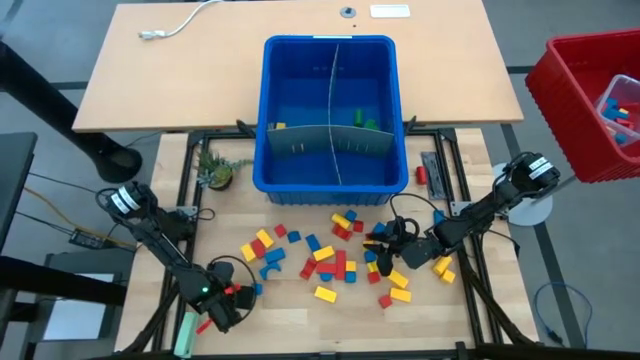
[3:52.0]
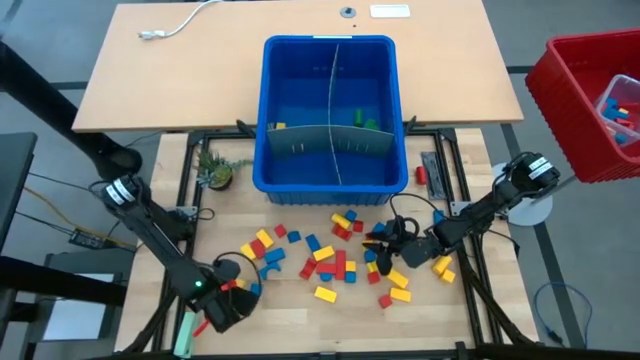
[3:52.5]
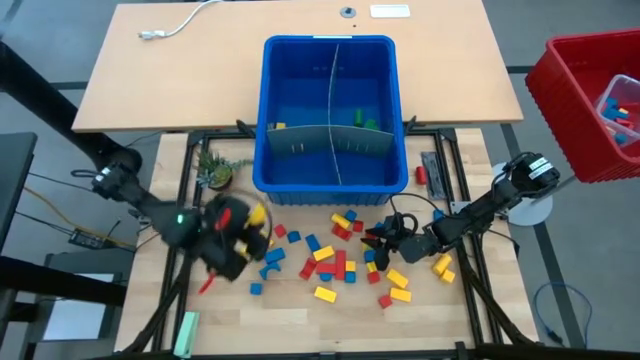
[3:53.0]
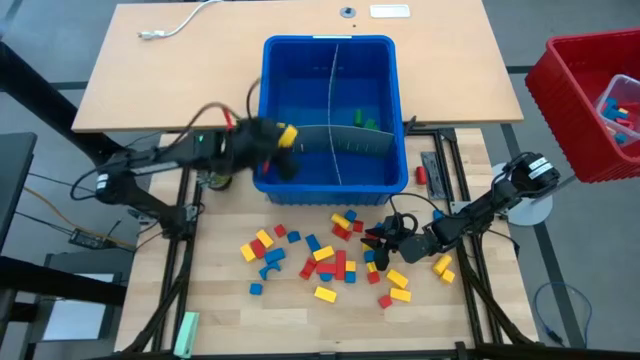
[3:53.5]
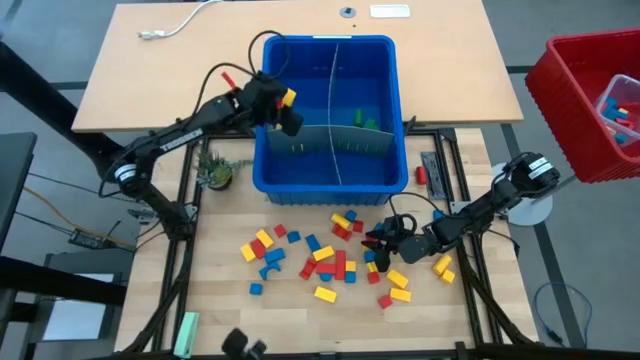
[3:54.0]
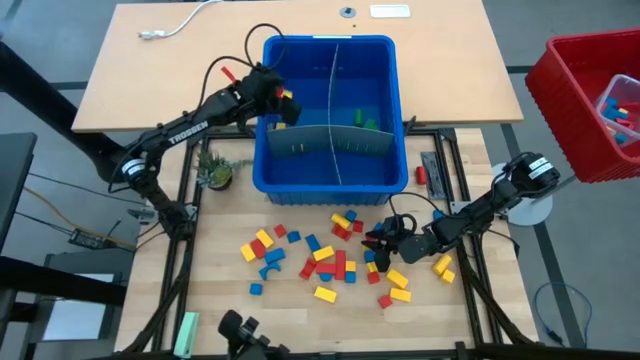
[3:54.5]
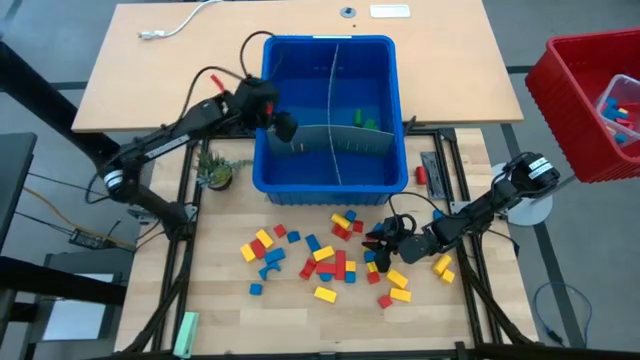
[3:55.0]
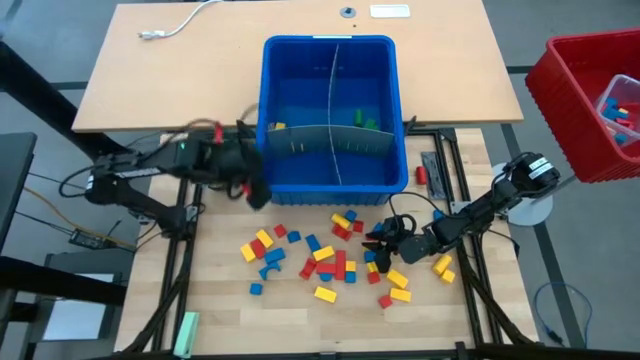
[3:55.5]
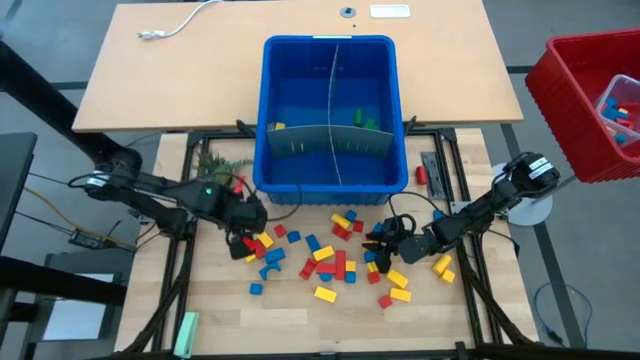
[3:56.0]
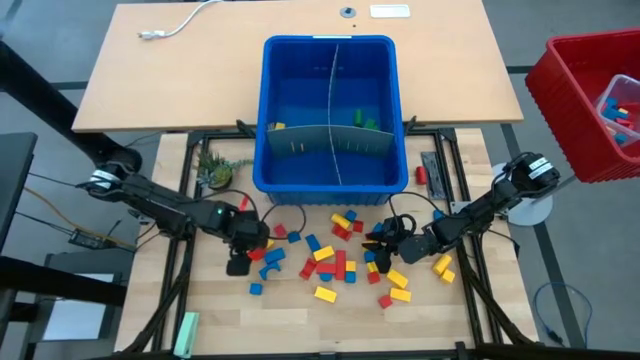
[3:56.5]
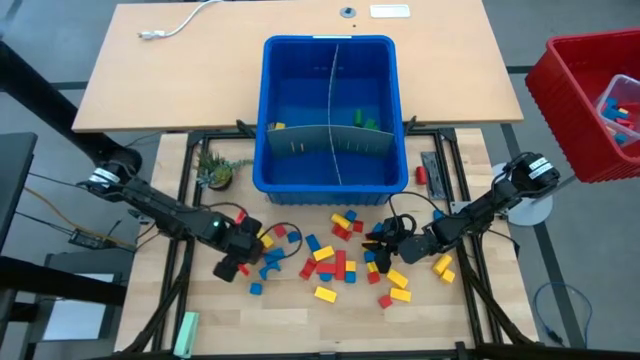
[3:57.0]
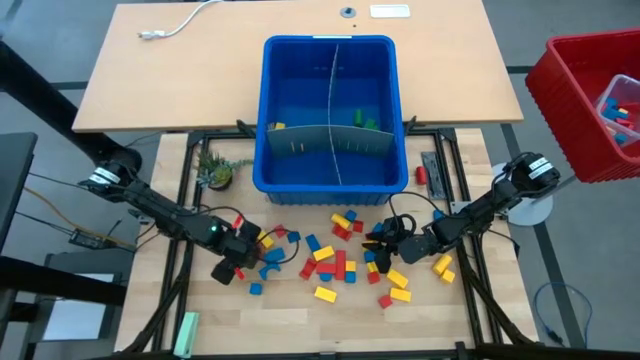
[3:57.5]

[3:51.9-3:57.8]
Task: Sort blocks
Put the yellow block with the other yellow block into the blue bin

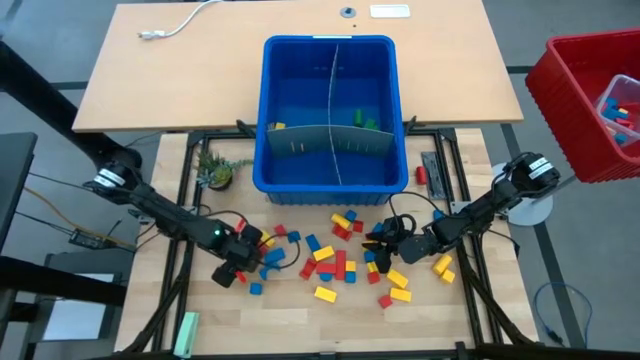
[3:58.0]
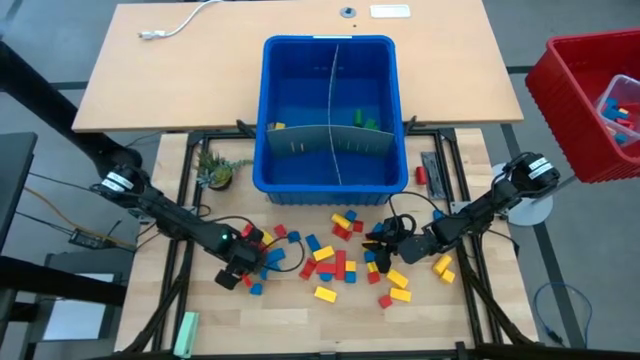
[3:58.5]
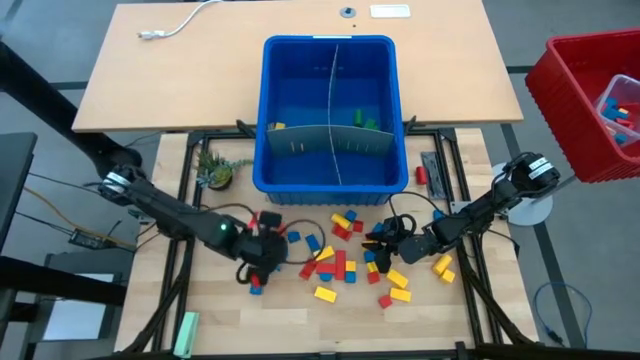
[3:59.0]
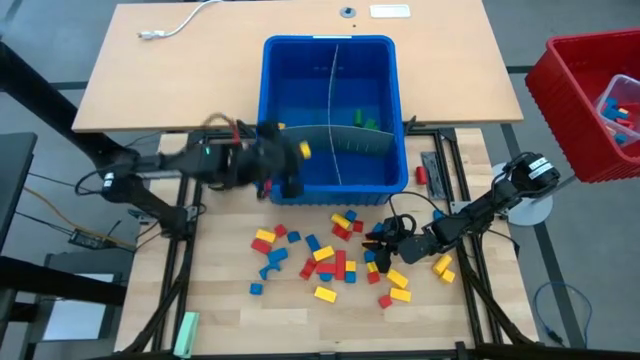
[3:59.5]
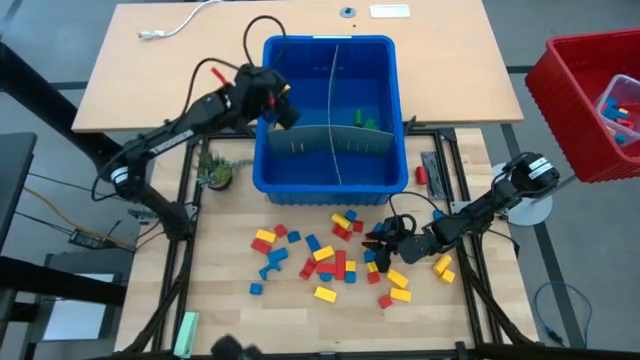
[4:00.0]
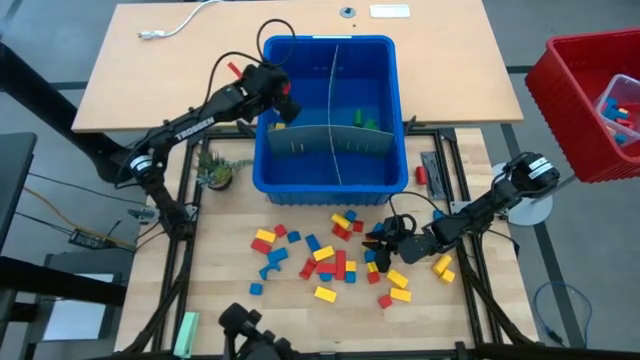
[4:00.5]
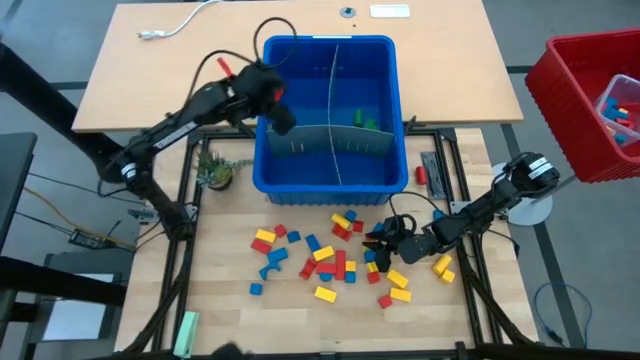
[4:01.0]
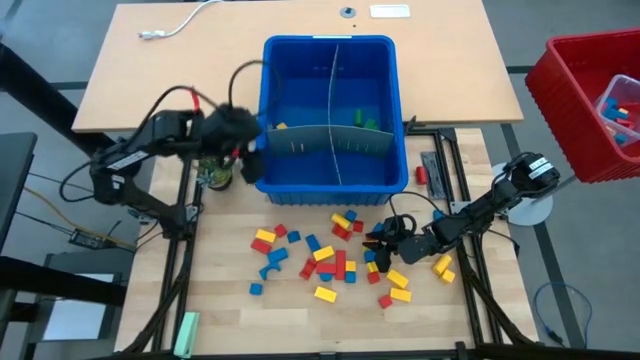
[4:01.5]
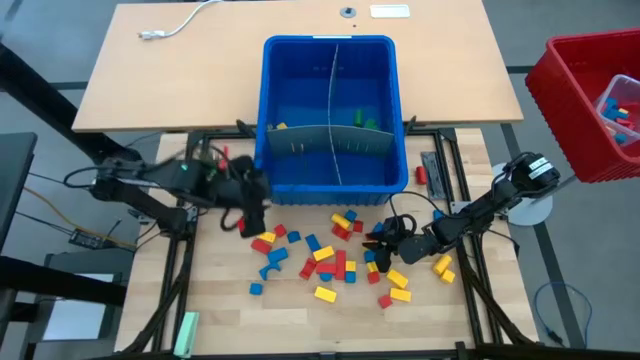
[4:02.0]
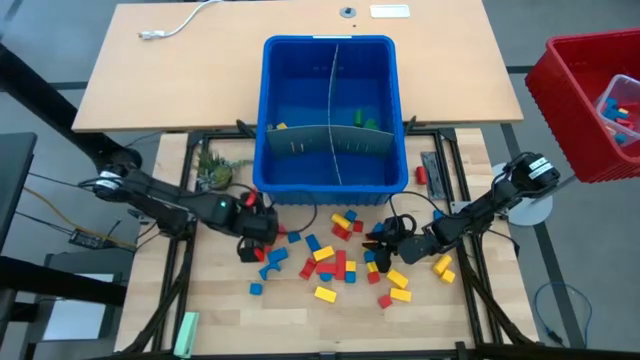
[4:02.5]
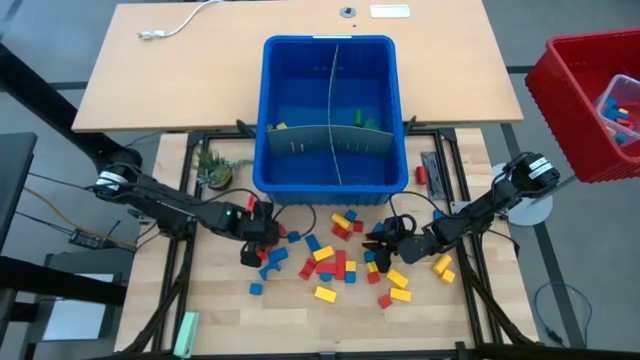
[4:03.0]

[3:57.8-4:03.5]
Put the yellow block with the other yellow blocks into the blue bin

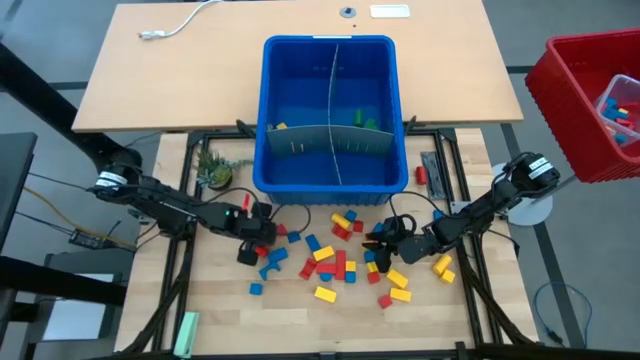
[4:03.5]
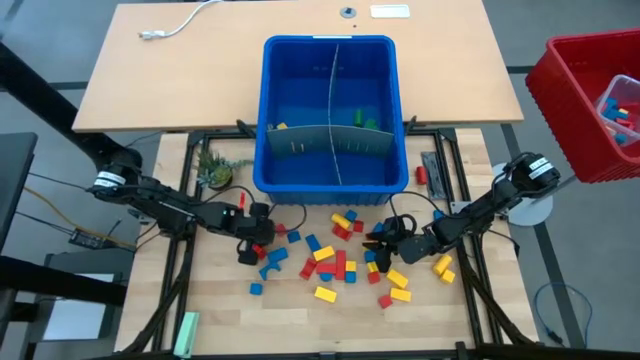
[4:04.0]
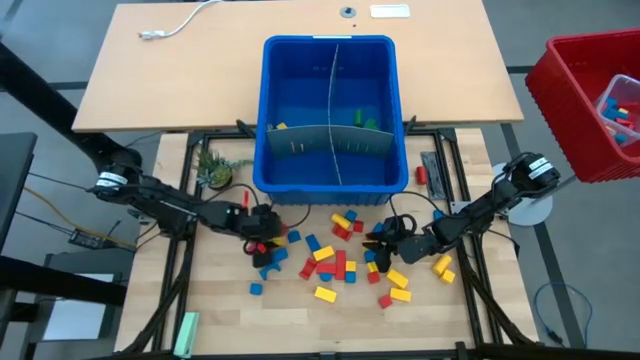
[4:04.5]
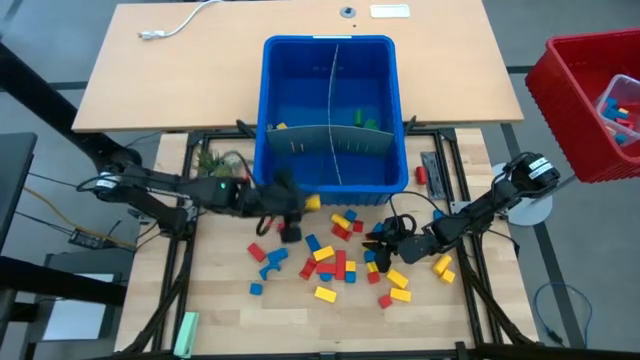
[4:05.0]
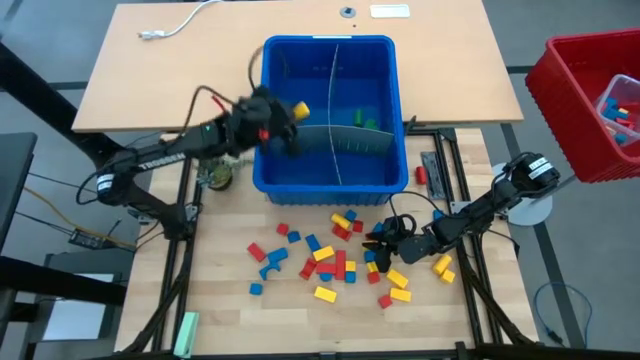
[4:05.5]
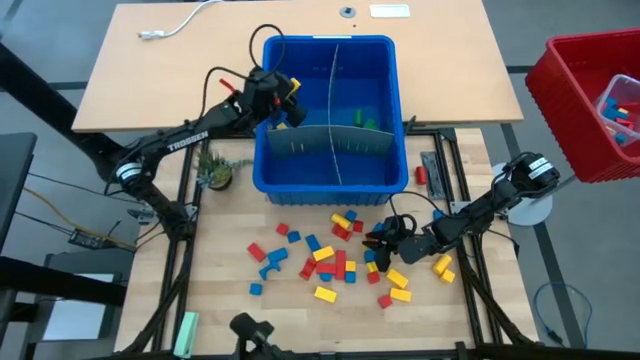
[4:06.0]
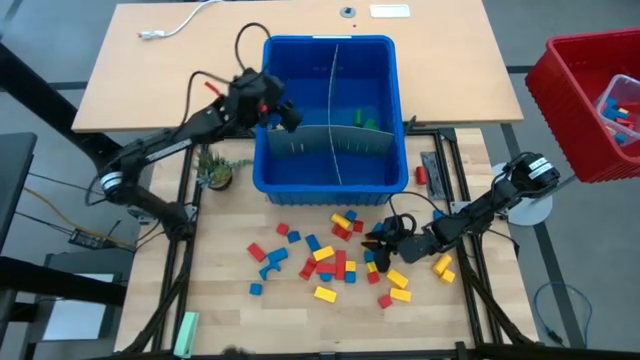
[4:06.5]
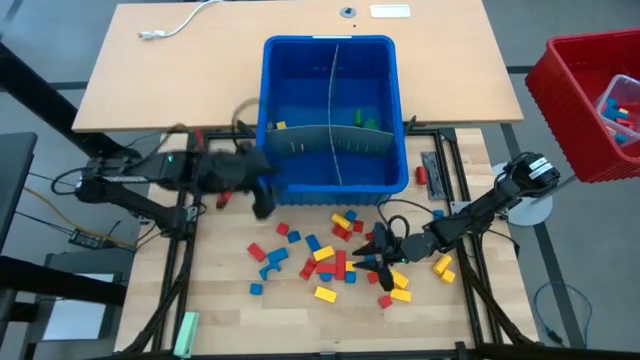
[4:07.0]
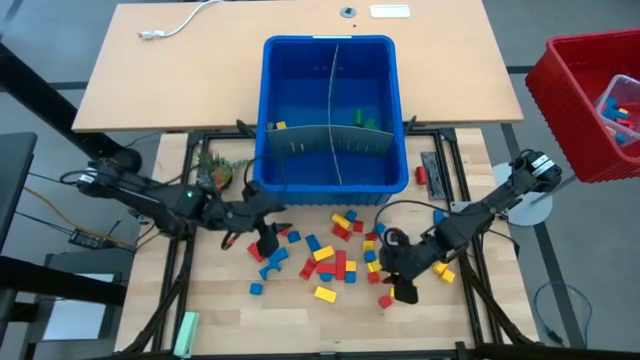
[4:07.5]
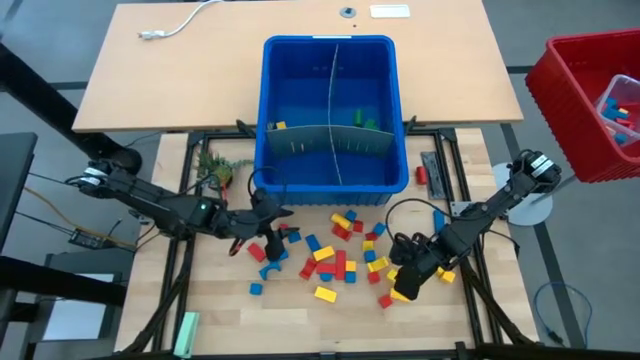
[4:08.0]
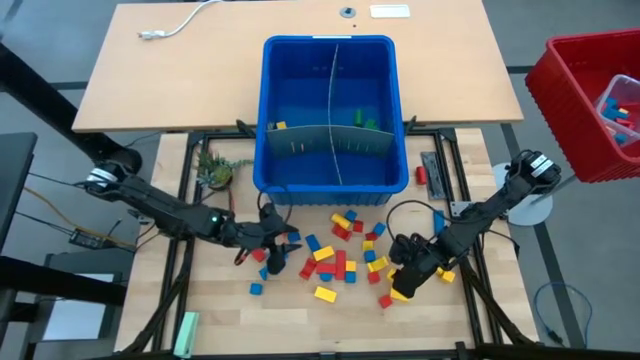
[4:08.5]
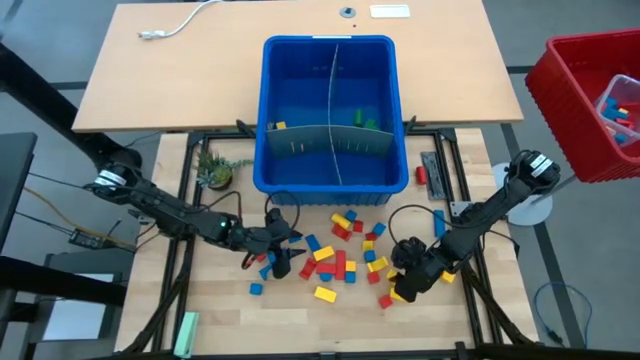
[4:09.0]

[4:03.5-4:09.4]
Put the yellow block with the other yellow blocks into the blue bin

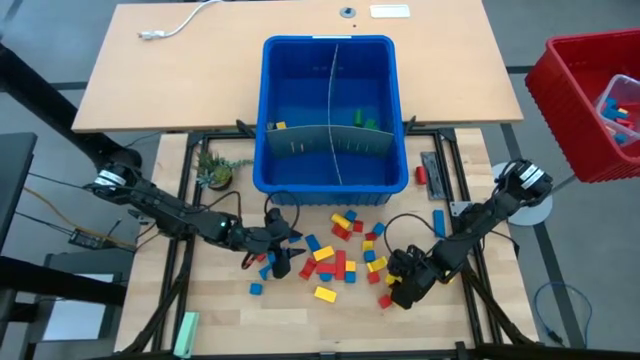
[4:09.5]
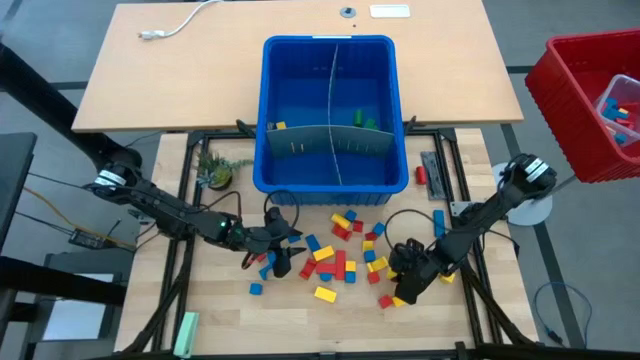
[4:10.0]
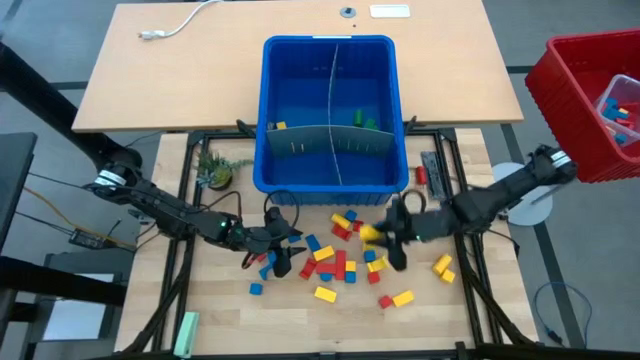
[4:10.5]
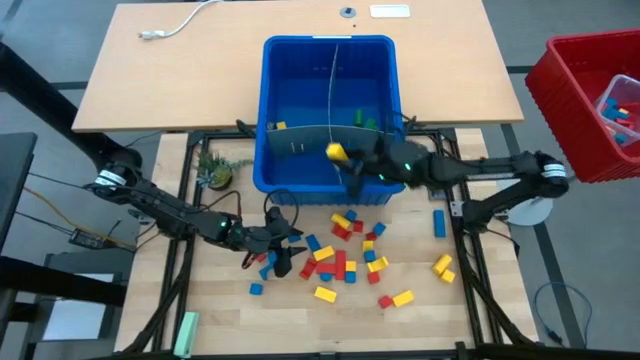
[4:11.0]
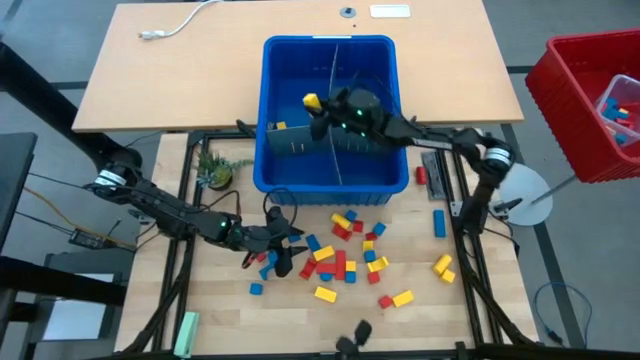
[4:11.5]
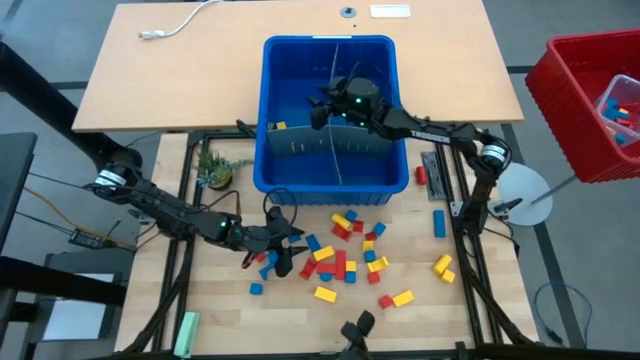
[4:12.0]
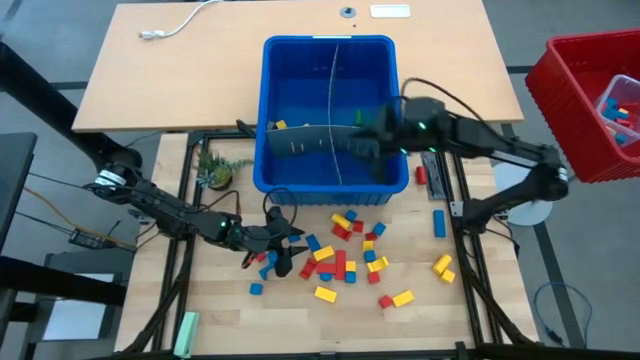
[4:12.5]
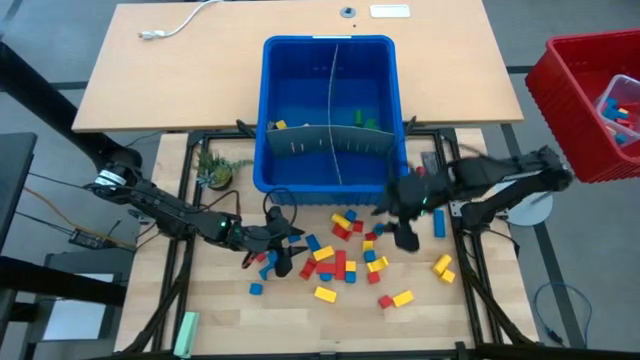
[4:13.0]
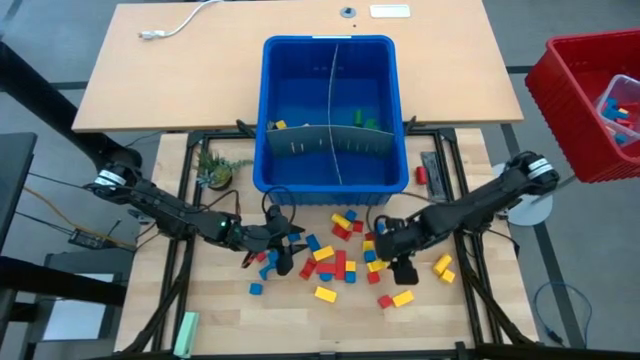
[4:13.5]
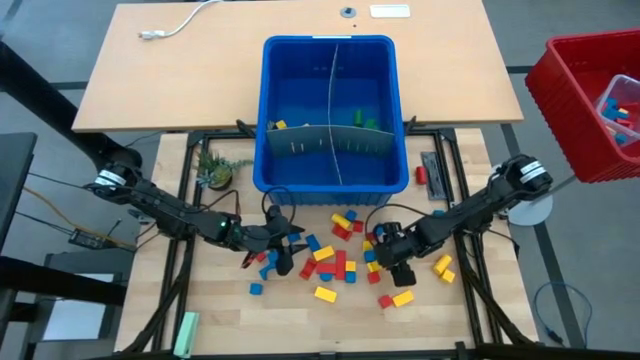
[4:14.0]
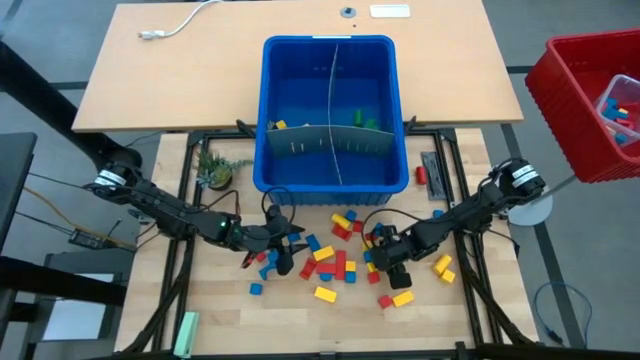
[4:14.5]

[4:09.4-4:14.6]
Put the yellow block with the other yellow blocks into the blue bin
